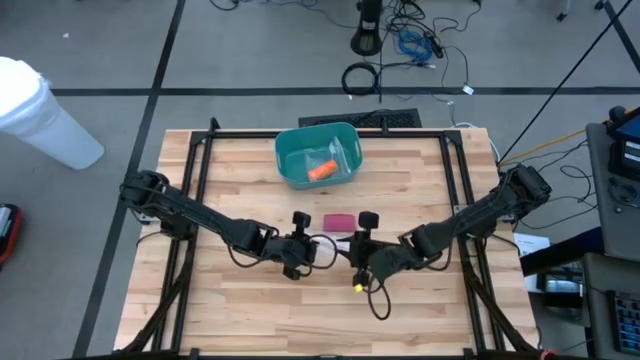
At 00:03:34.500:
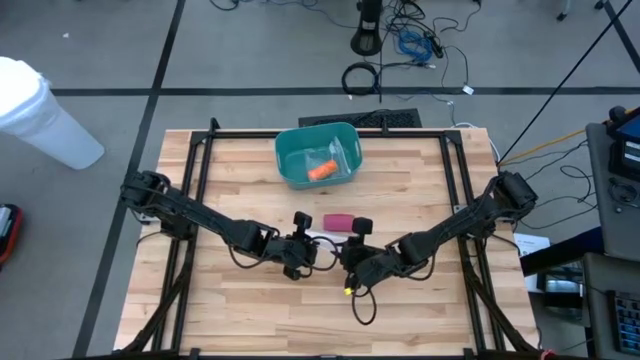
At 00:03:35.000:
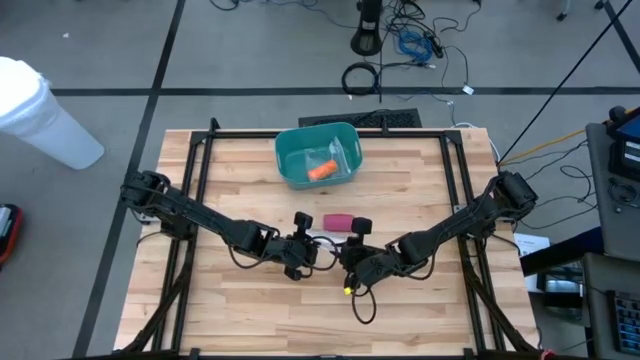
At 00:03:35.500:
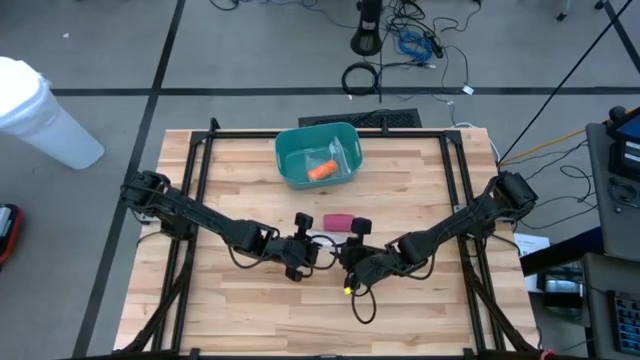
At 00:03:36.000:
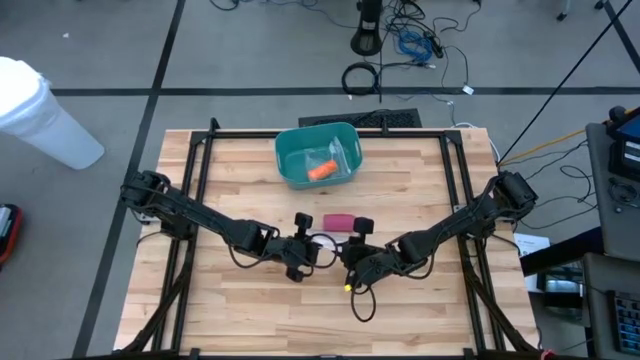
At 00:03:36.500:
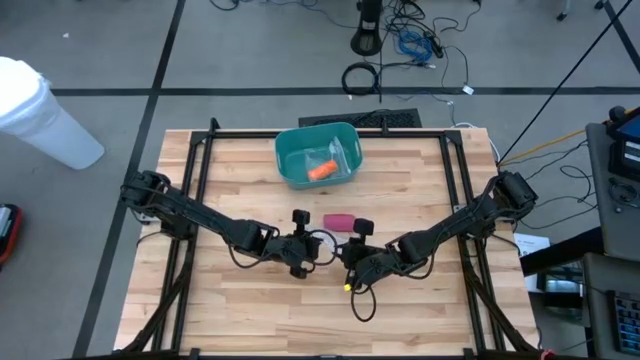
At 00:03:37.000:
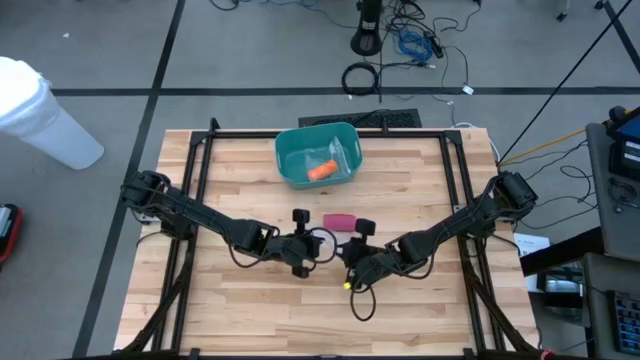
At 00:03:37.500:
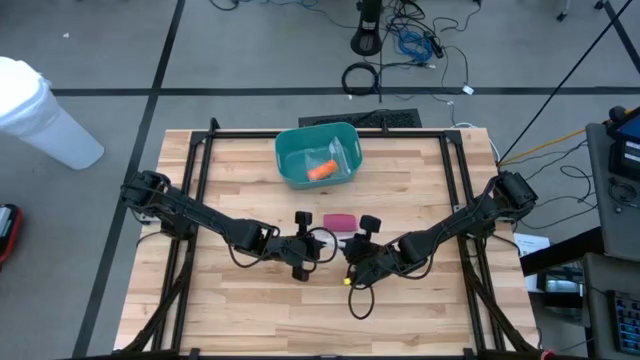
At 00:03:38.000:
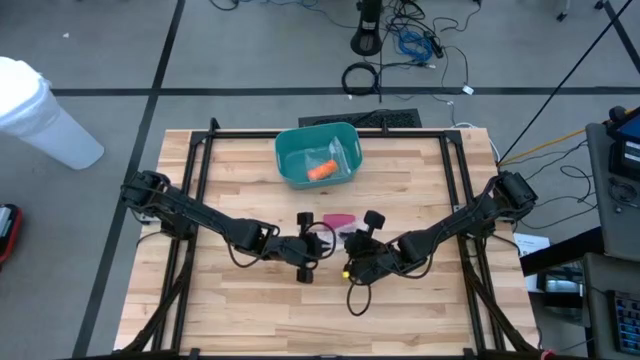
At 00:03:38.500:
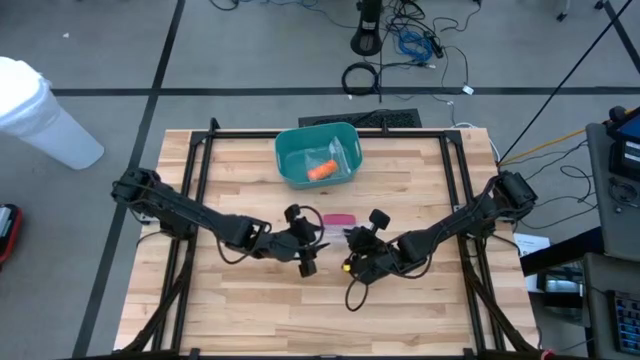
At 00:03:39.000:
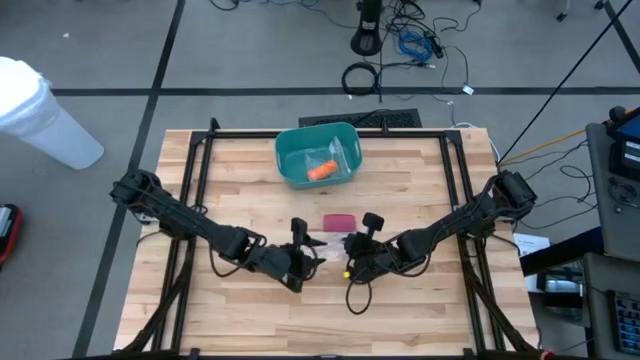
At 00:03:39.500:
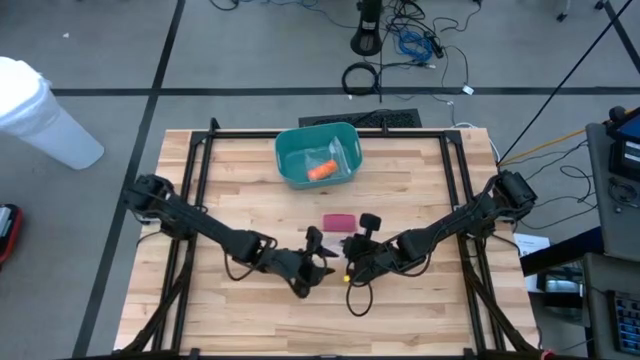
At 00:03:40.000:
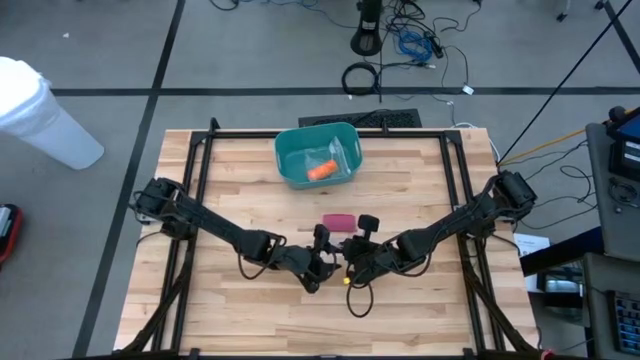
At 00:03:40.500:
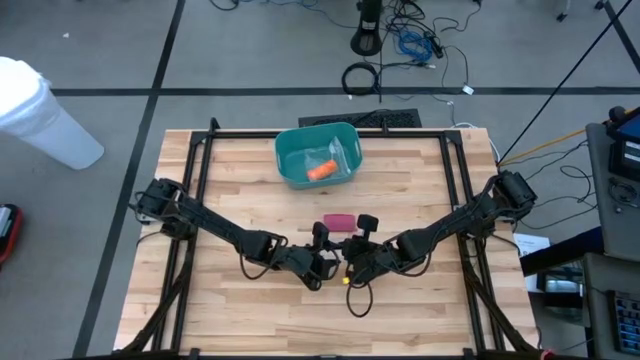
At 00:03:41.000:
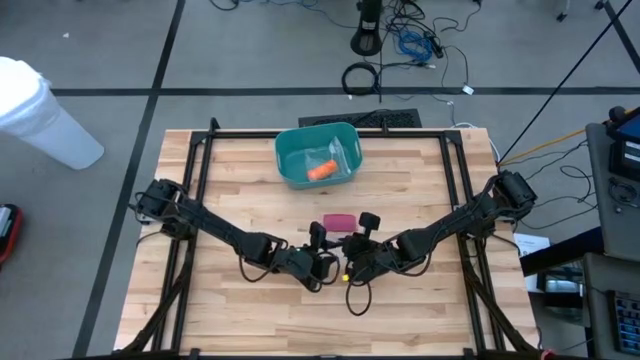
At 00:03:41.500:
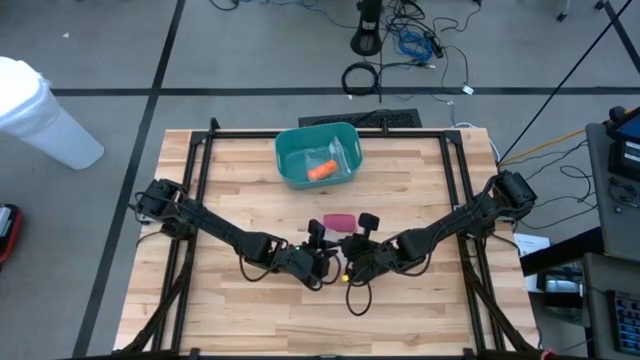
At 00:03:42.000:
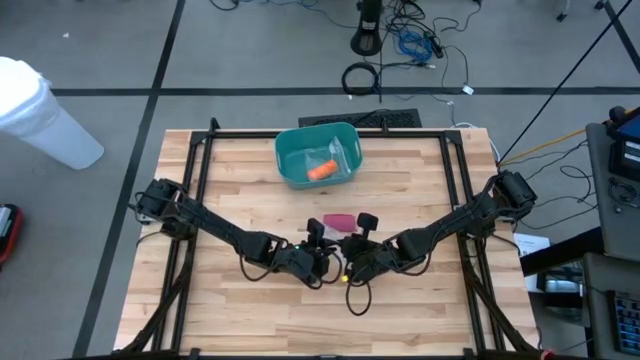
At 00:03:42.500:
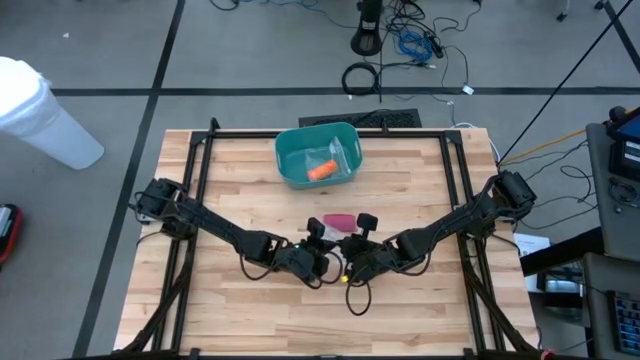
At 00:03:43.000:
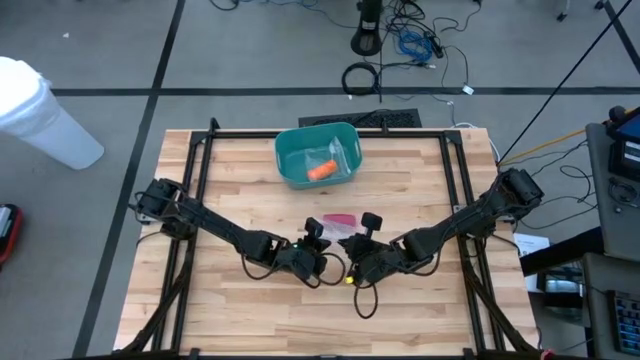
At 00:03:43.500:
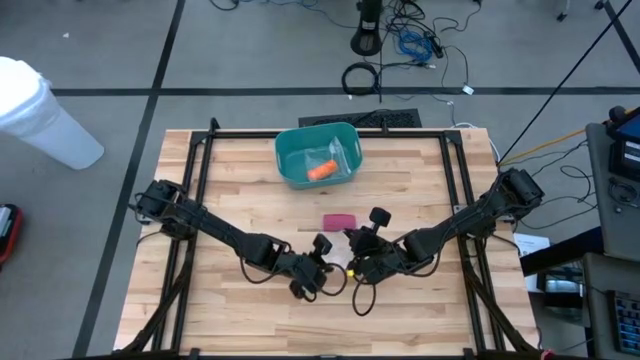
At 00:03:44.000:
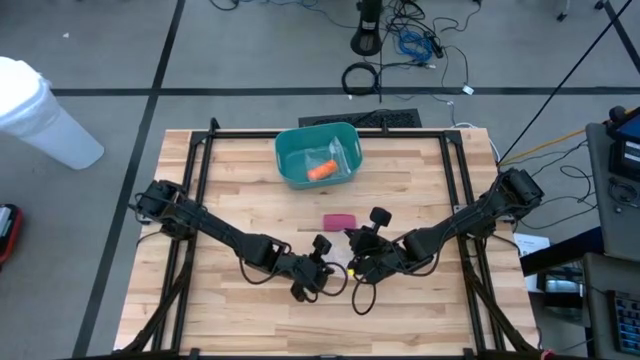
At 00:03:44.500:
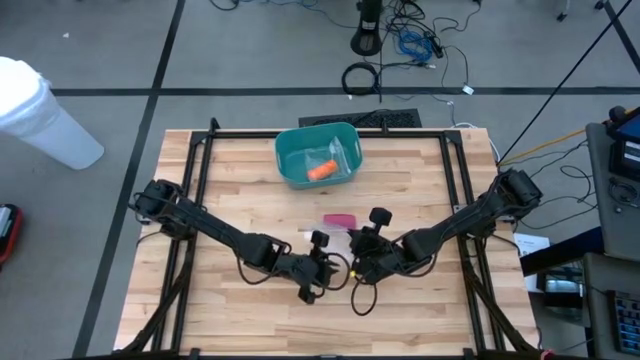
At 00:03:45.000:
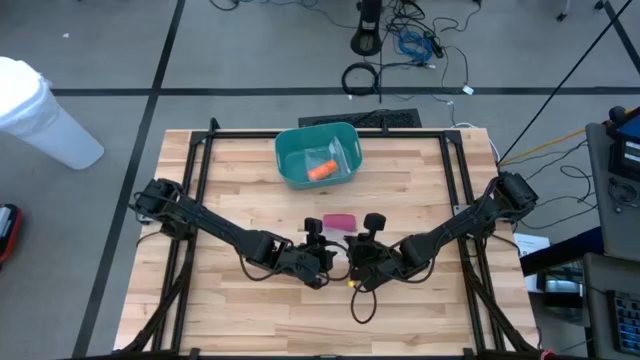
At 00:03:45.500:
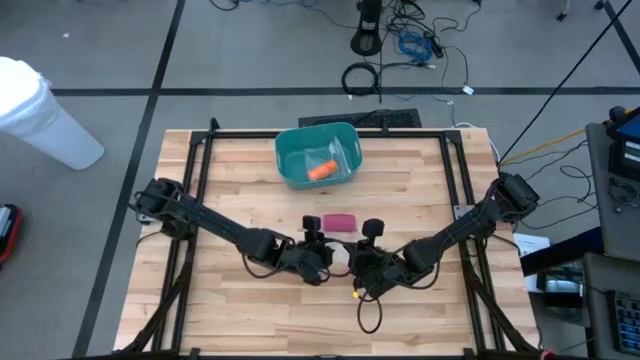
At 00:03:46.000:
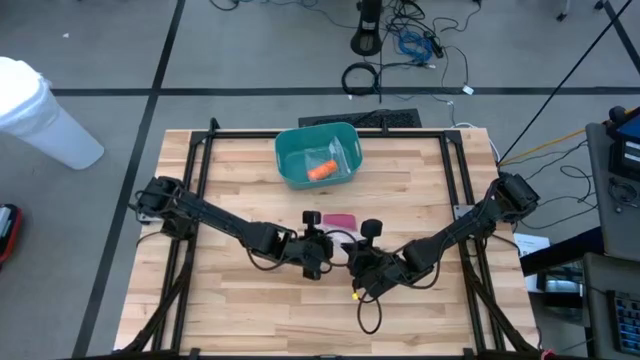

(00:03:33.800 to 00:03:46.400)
Task: Roll bandage
Put the pink bandage into the transparent zip bag
